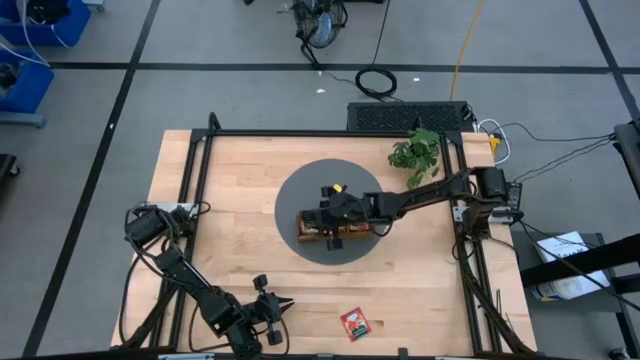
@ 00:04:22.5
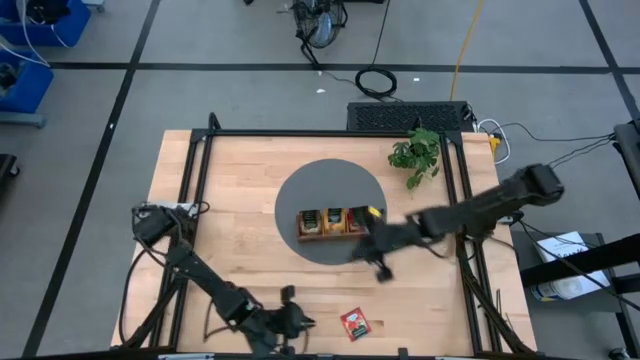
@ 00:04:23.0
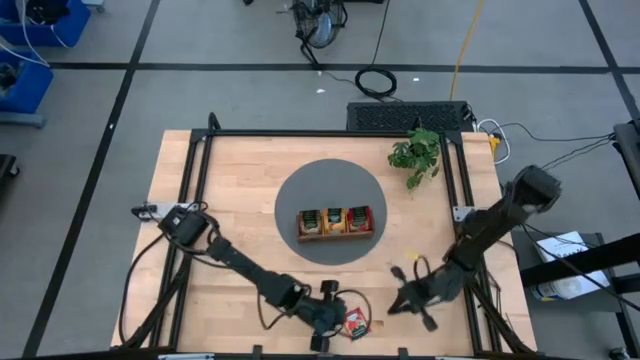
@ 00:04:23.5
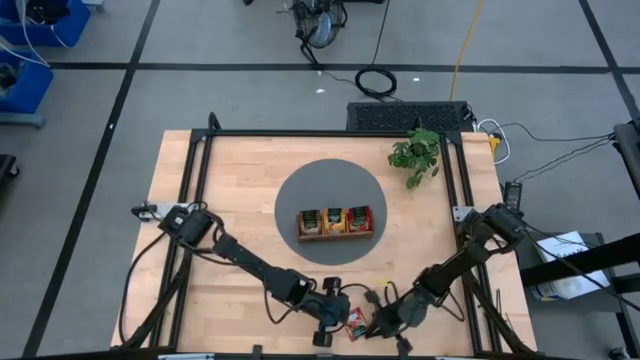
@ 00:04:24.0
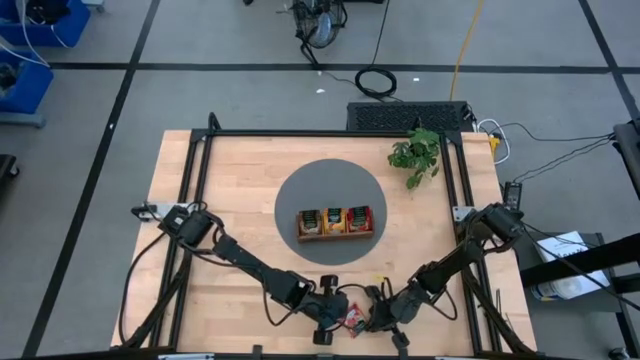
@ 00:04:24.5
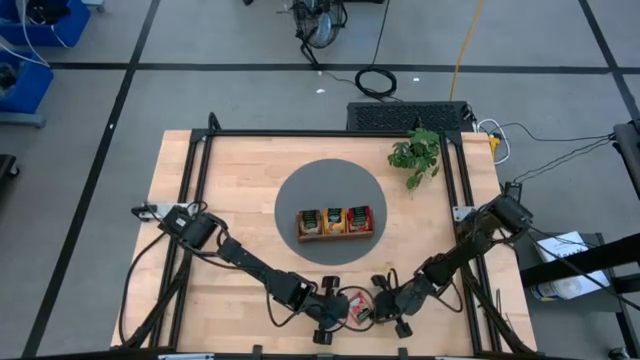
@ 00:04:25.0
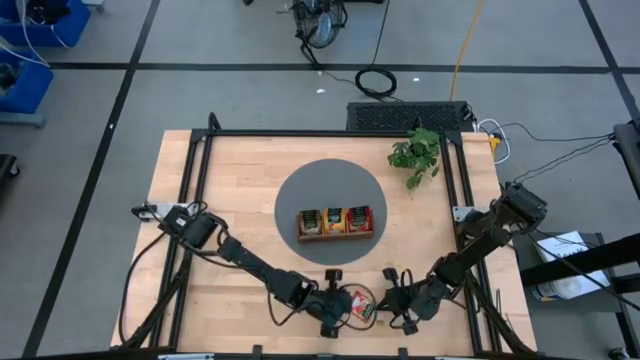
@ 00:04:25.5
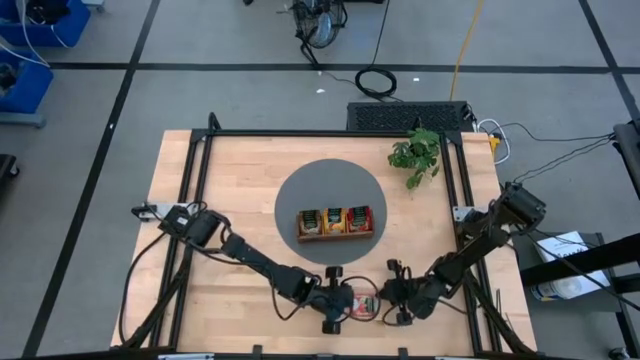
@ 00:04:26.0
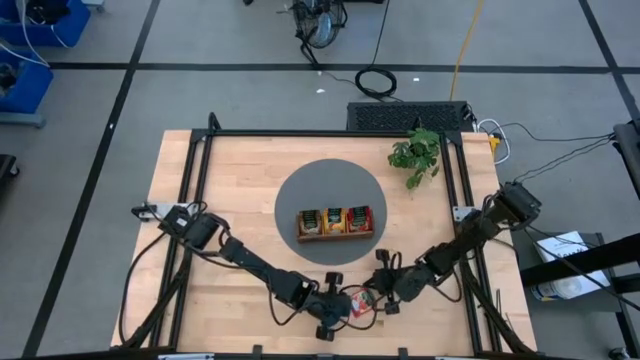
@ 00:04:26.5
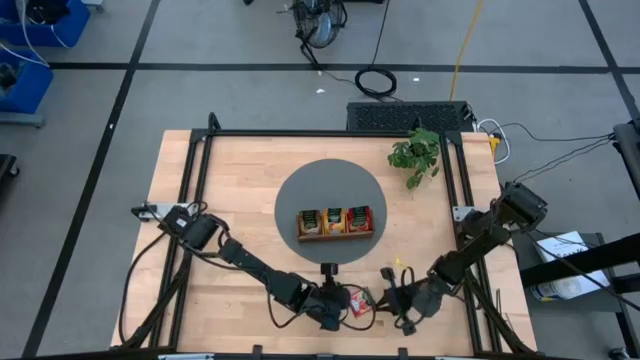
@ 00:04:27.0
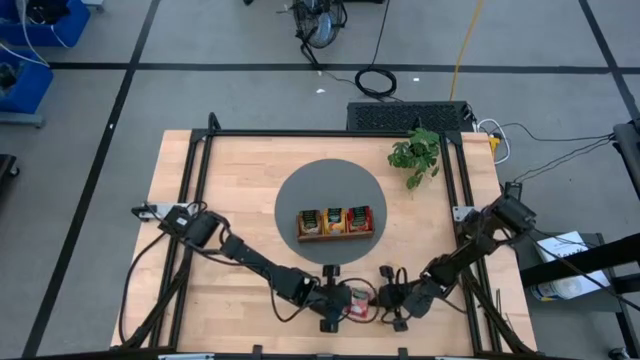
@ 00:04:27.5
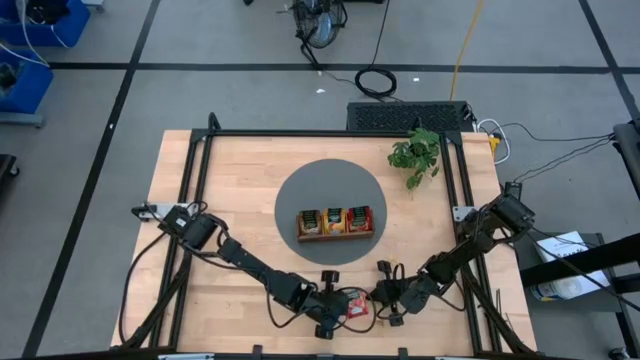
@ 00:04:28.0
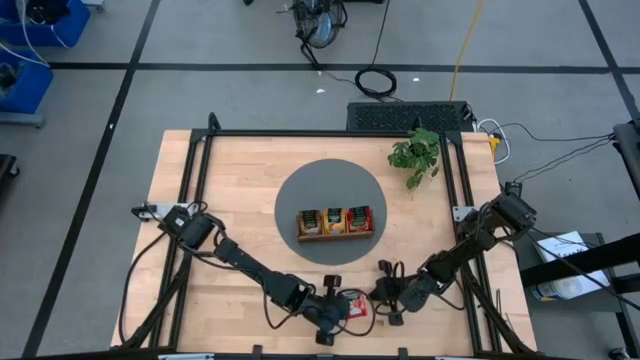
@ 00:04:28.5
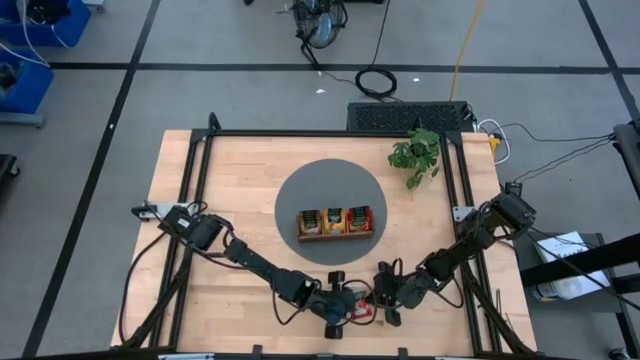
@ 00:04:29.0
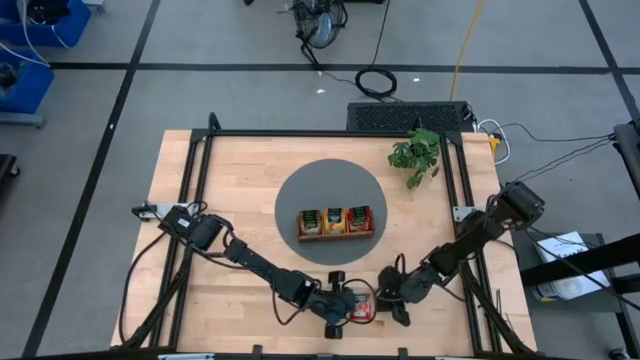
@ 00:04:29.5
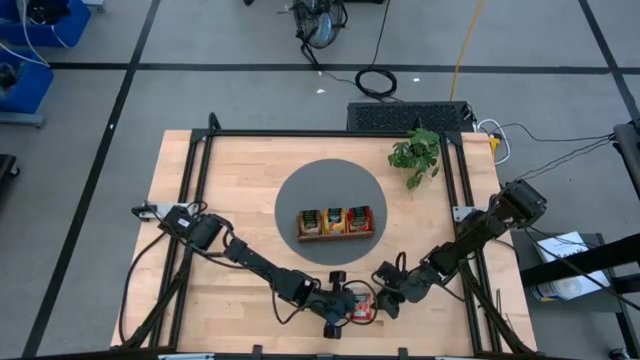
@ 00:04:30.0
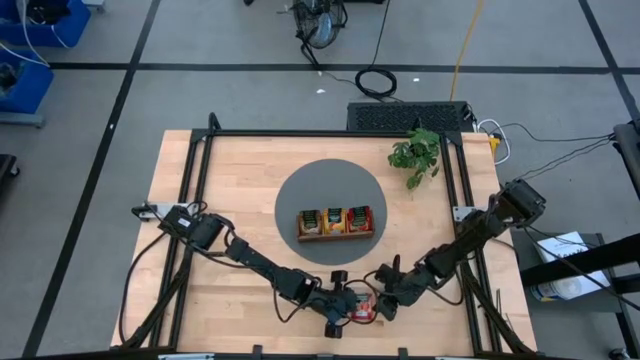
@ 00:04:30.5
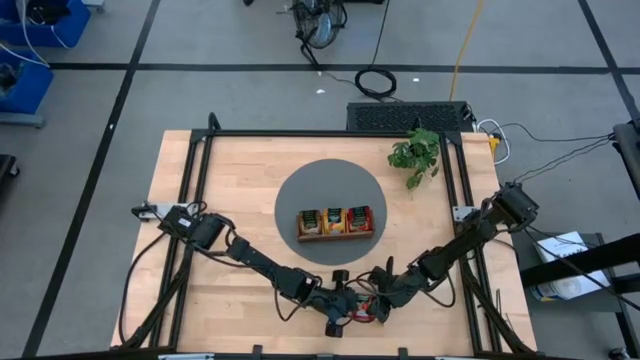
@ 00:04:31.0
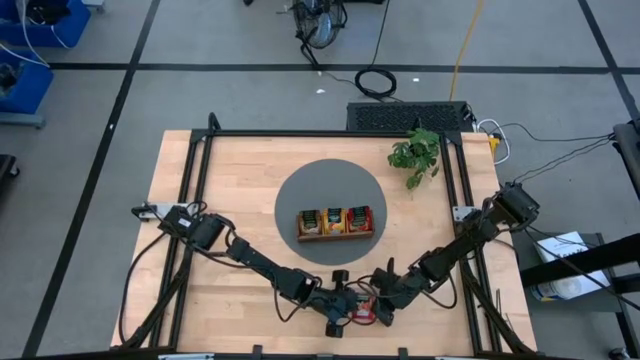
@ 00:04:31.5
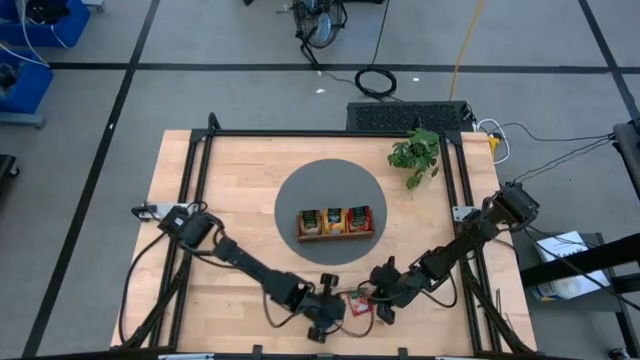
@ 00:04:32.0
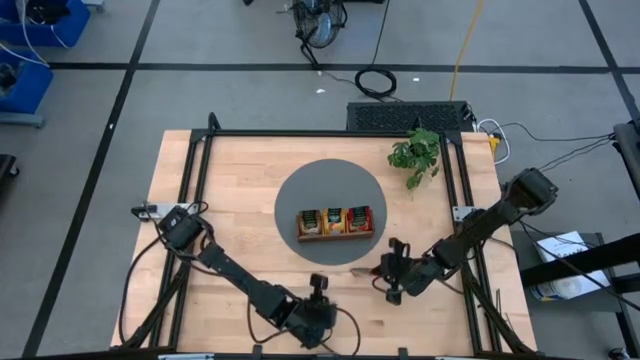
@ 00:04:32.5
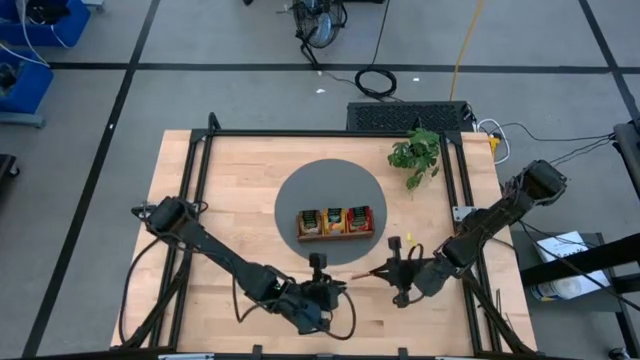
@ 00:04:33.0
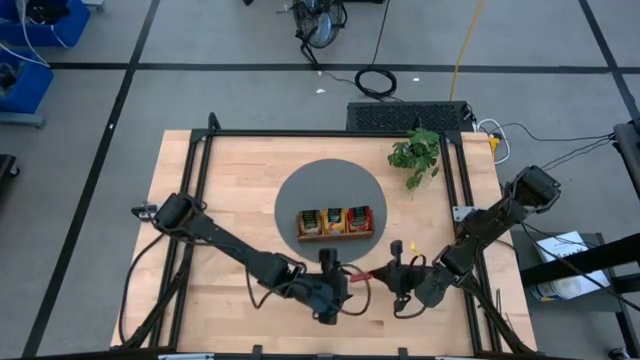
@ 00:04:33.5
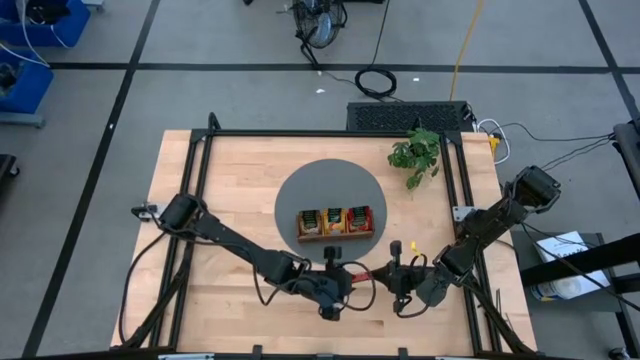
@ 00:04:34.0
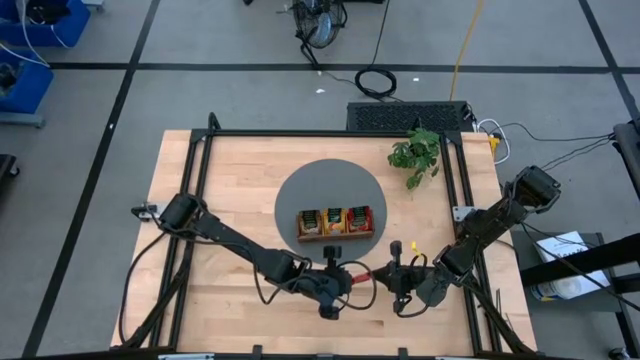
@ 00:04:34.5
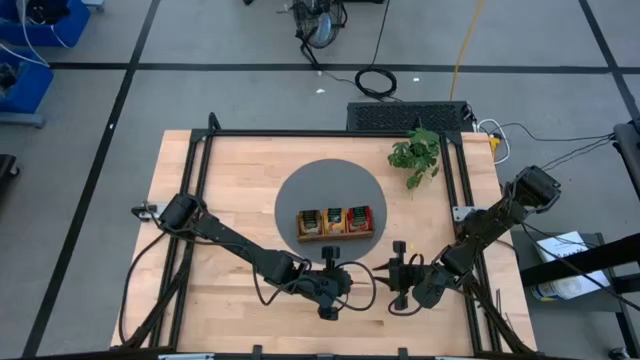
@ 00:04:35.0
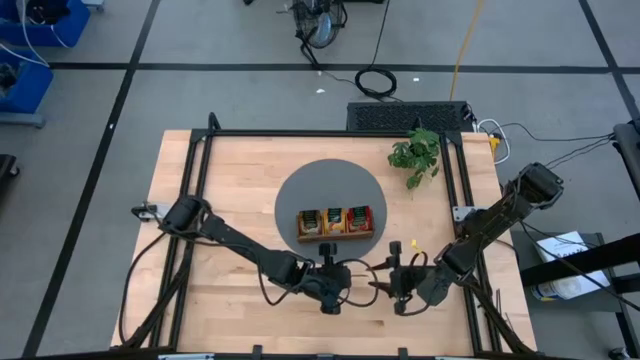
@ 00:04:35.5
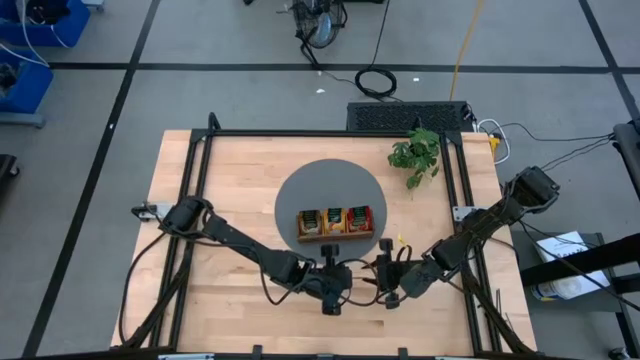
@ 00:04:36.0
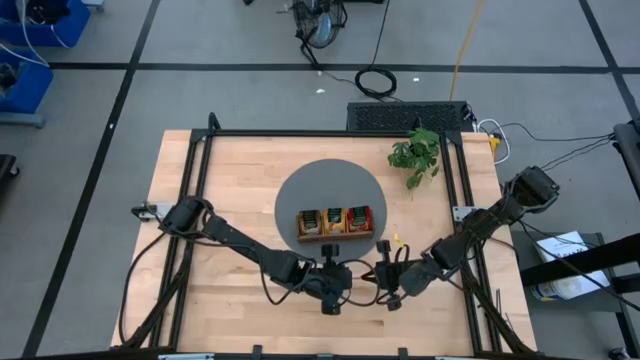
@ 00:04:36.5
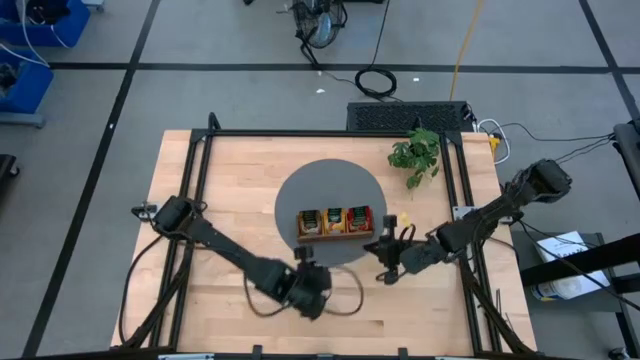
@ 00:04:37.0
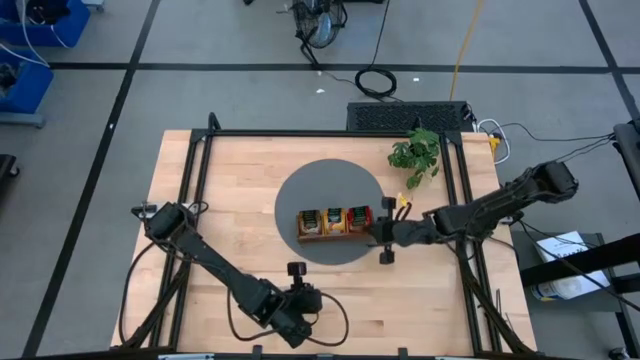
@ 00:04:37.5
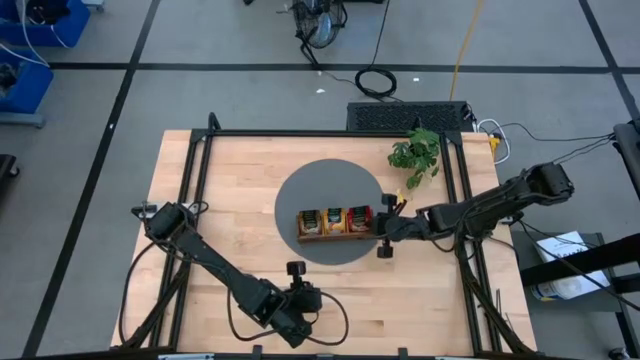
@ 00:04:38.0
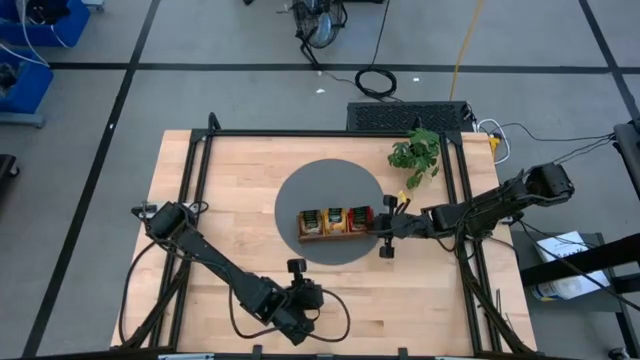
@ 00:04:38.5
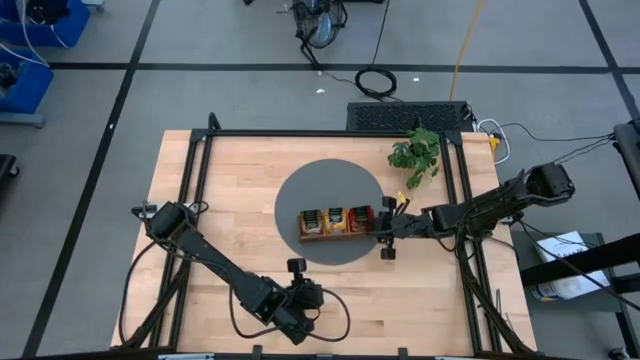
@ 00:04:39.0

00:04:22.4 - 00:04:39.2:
Task: Pick & Place Tea
Put the strawberry tea sachet into the right compartment of the wooden organizer

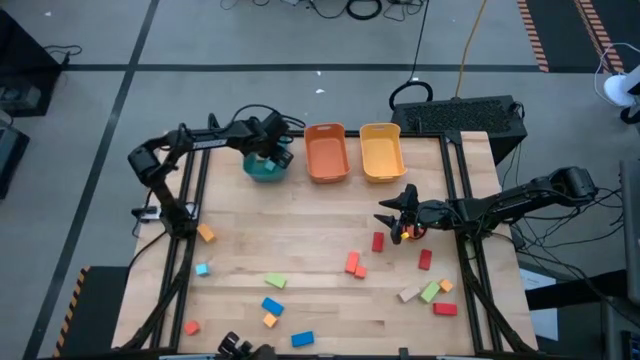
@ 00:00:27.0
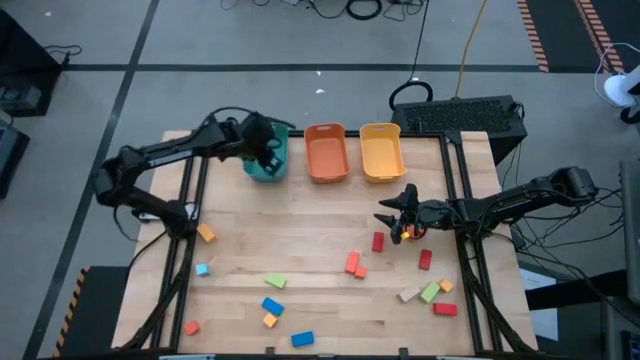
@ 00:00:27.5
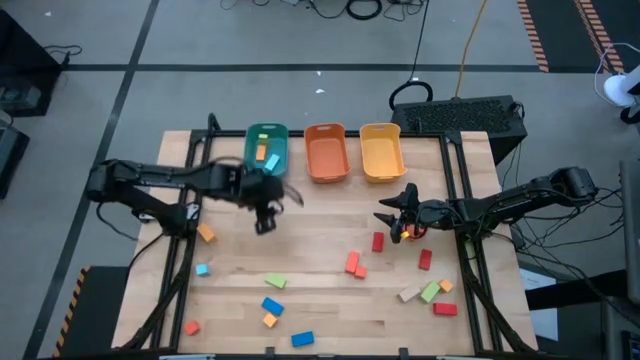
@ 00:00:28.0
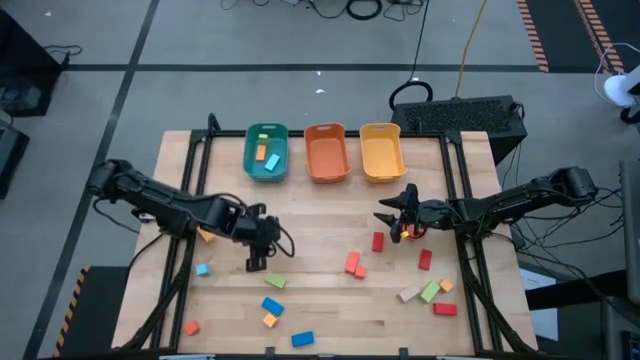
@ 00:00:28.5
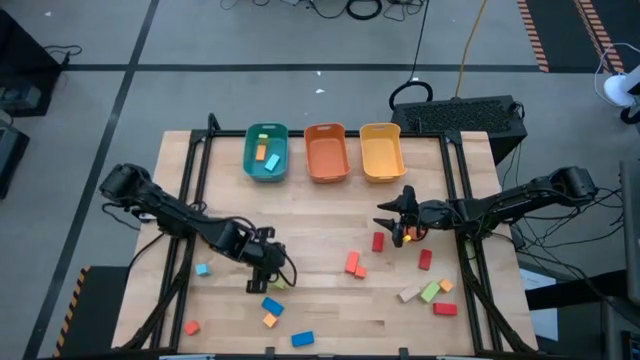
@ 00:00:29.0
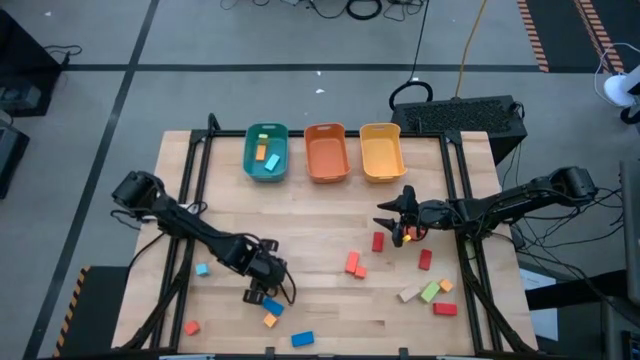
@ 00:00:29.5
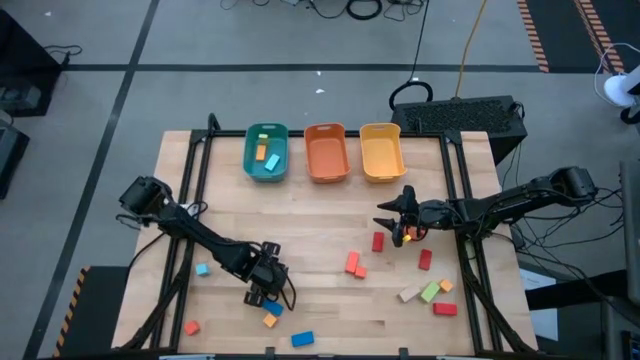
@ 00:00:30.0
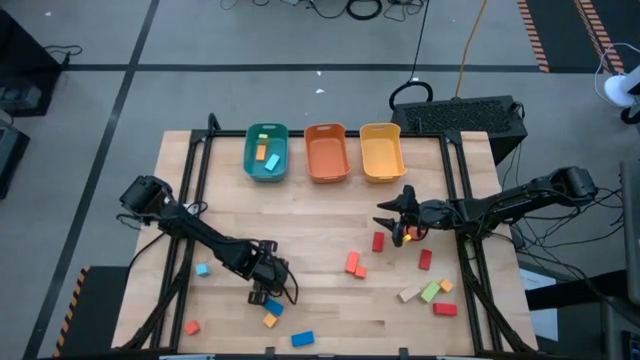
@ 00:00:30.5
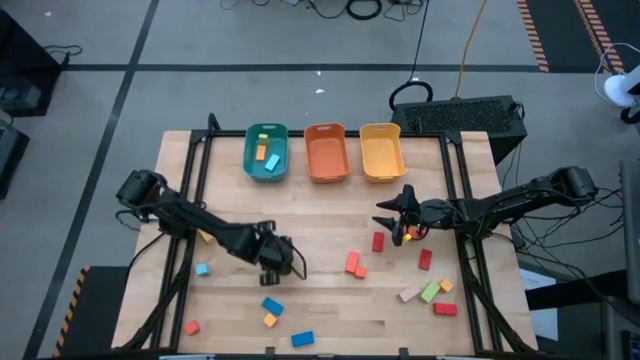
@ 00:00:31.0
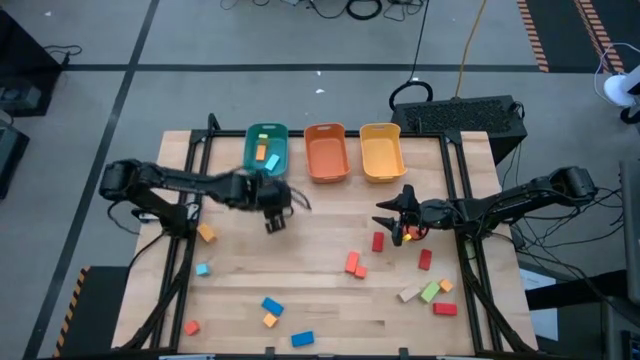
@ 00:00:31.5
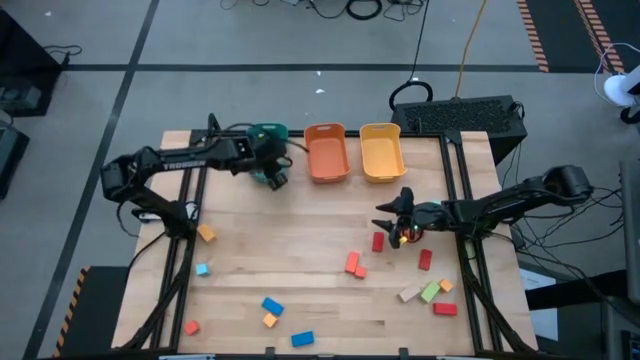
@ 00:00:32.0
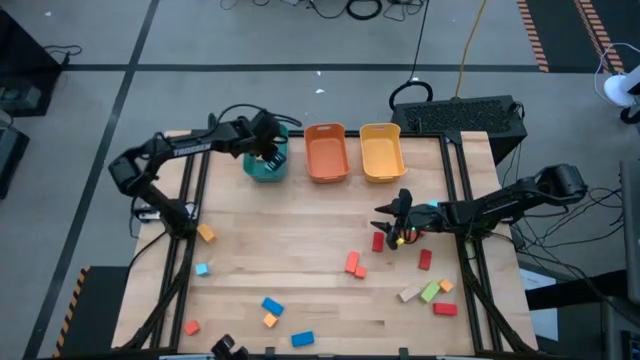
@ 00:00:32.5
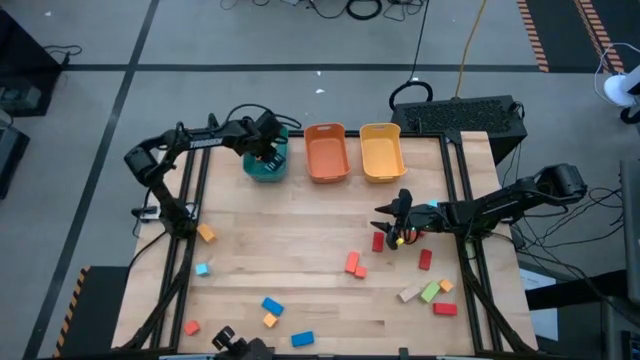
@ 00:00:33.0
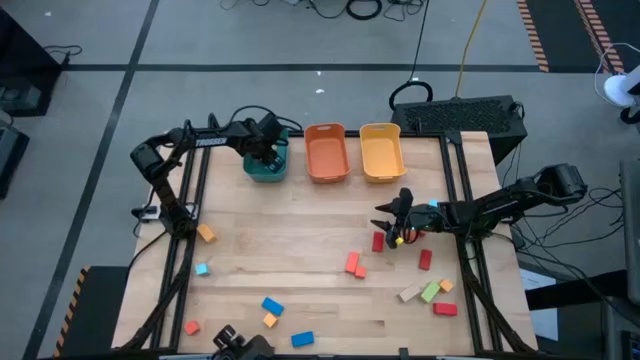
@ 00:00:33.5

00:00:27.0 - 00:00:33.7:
Task: Sort blocks by size
Put the green thin rectangular block into the blue bin
